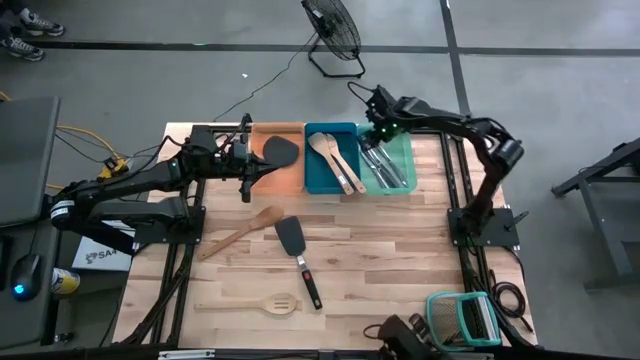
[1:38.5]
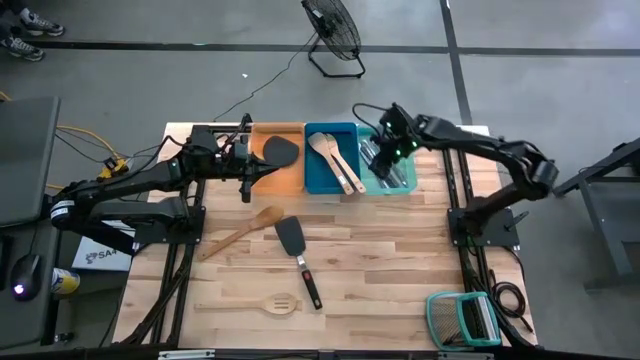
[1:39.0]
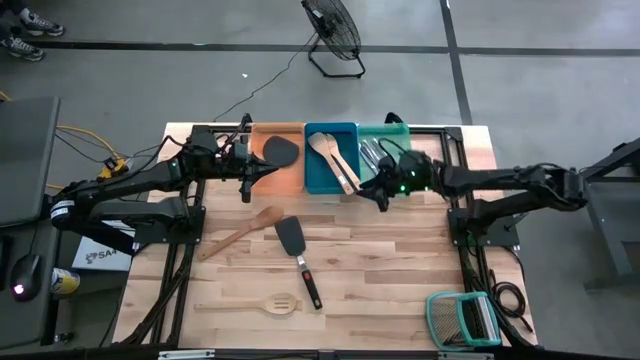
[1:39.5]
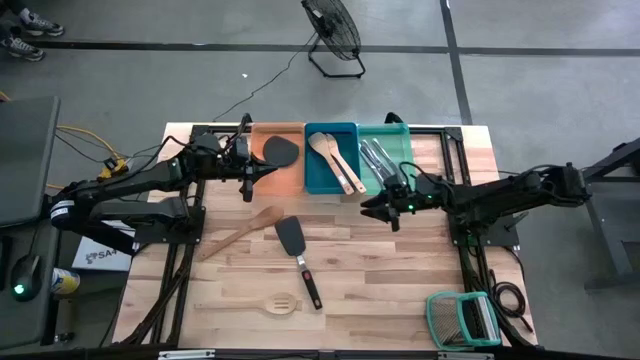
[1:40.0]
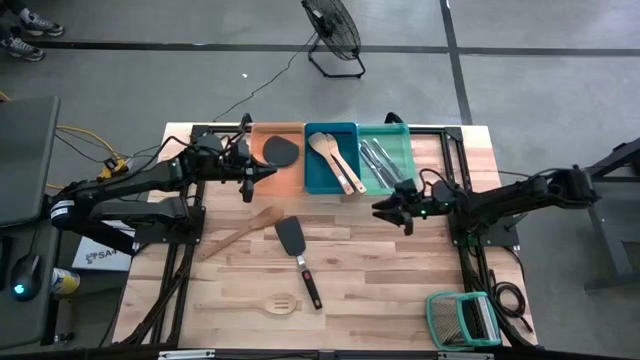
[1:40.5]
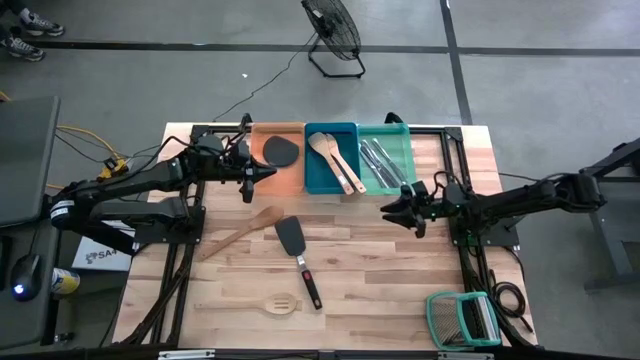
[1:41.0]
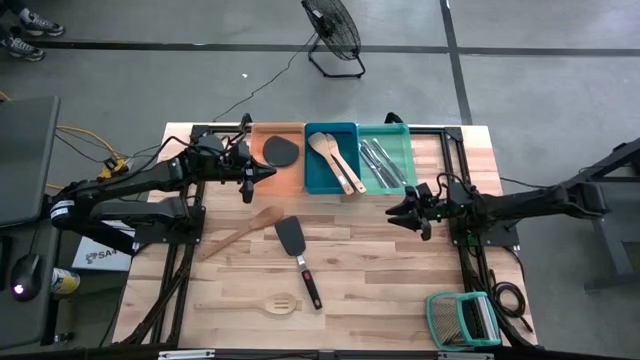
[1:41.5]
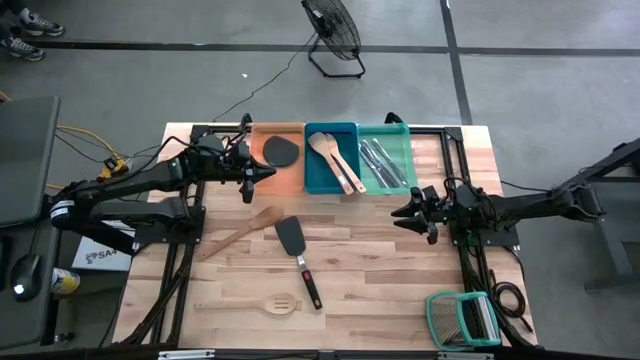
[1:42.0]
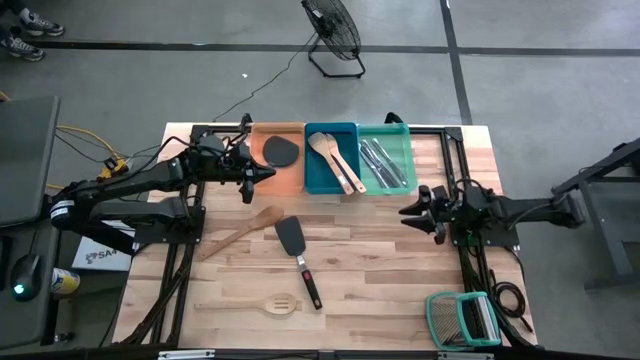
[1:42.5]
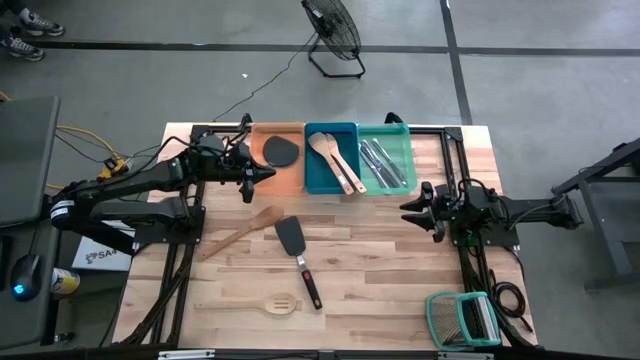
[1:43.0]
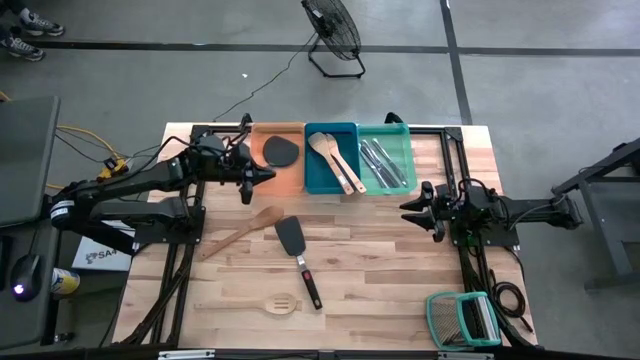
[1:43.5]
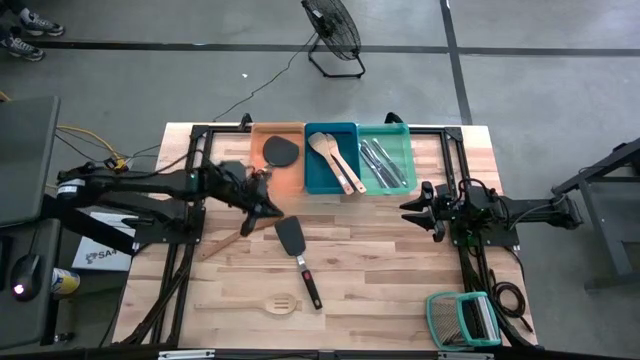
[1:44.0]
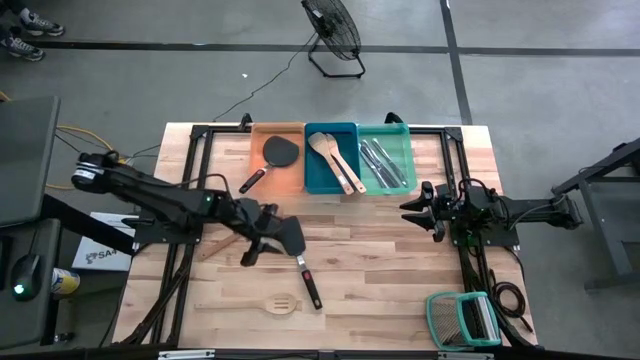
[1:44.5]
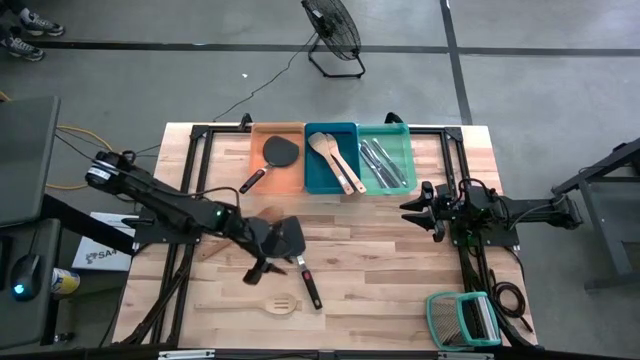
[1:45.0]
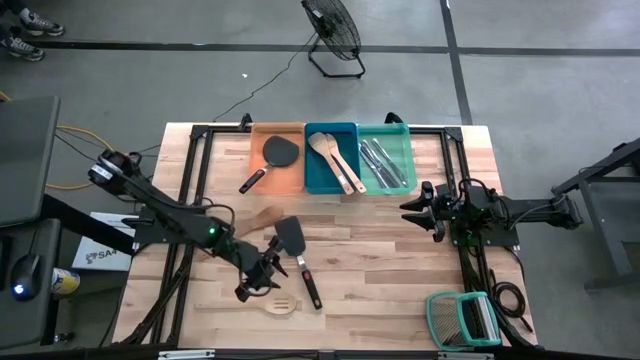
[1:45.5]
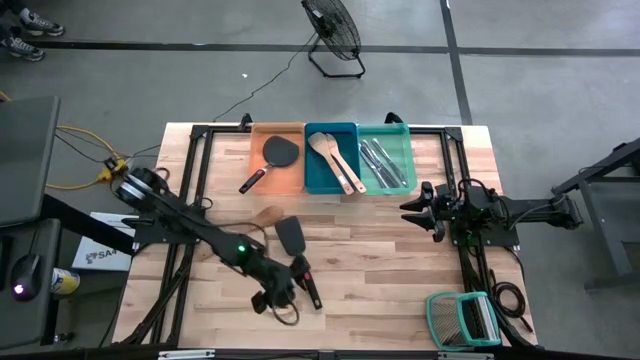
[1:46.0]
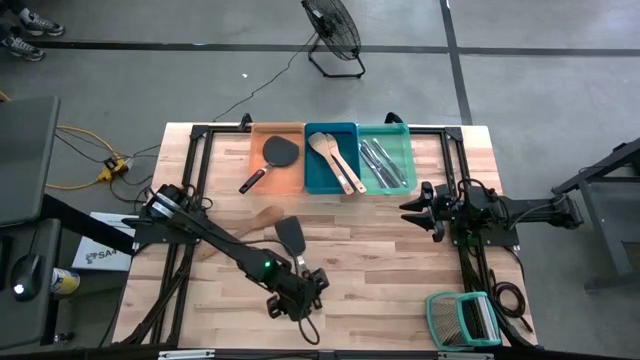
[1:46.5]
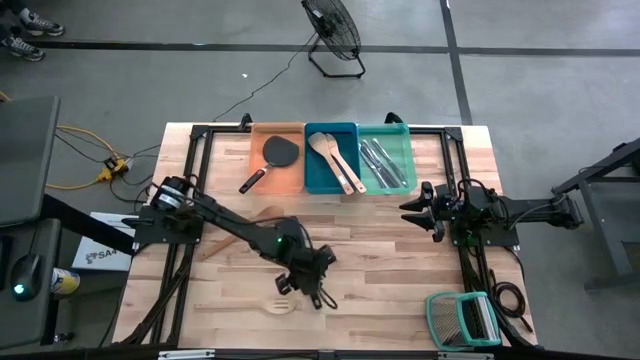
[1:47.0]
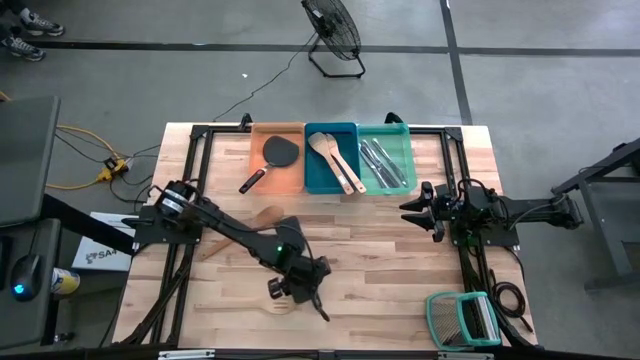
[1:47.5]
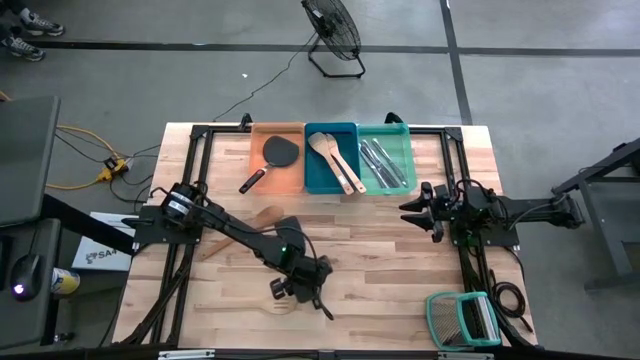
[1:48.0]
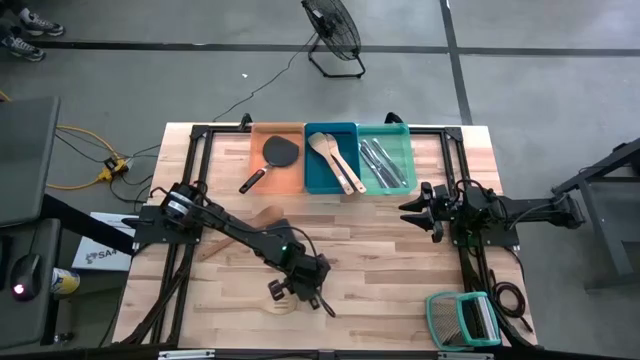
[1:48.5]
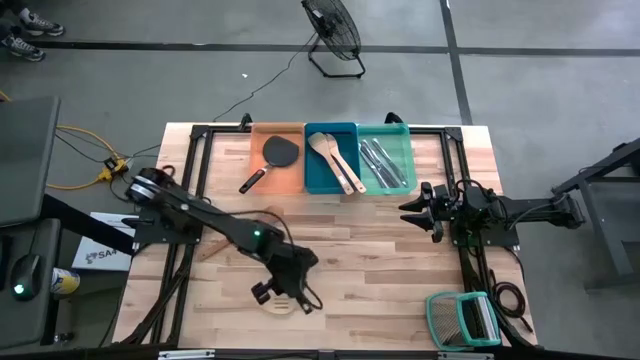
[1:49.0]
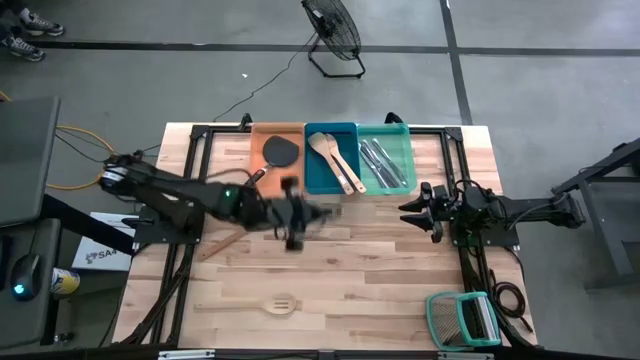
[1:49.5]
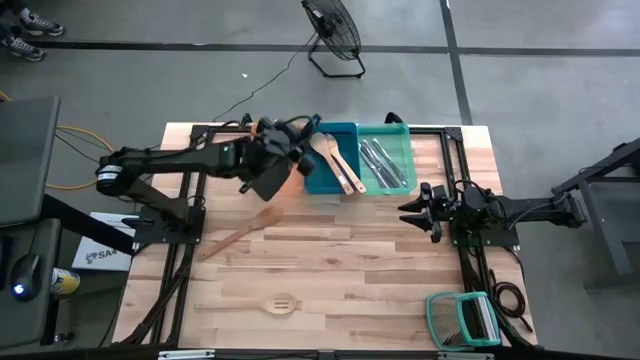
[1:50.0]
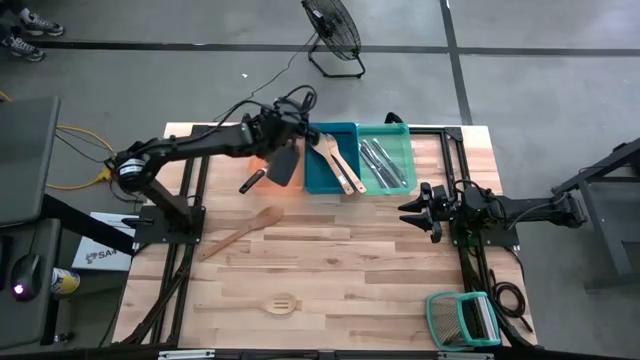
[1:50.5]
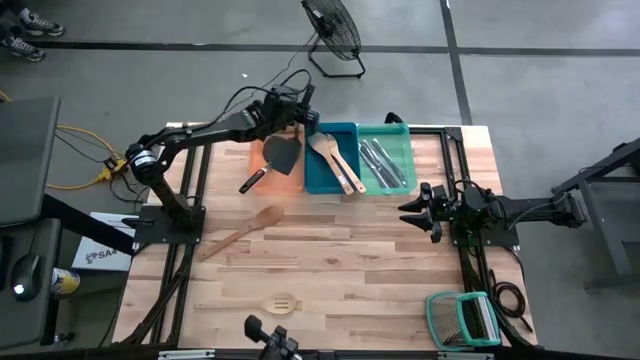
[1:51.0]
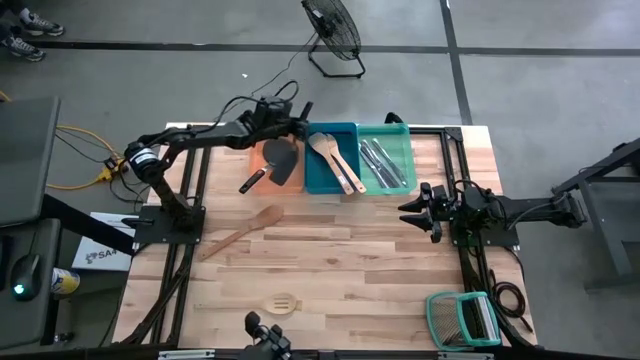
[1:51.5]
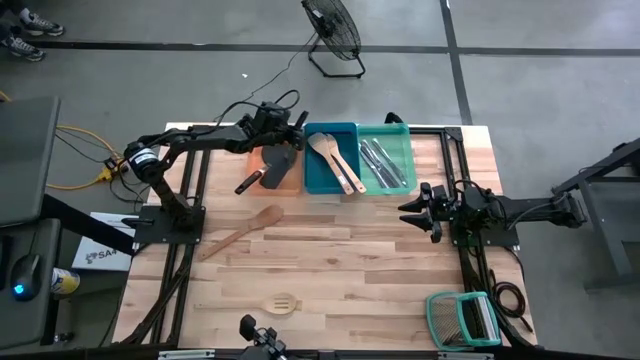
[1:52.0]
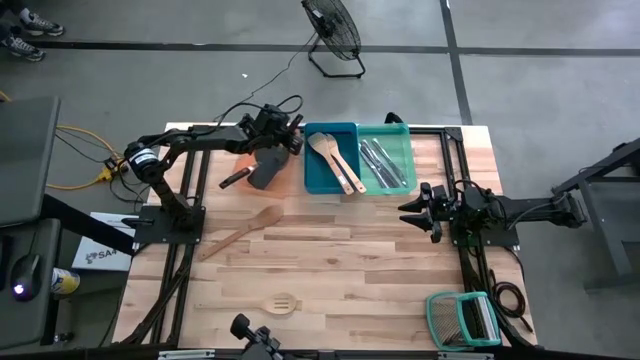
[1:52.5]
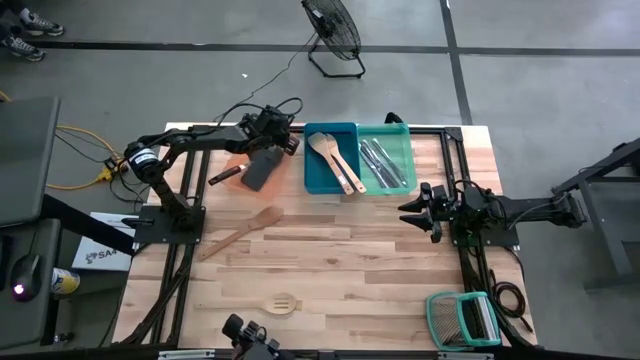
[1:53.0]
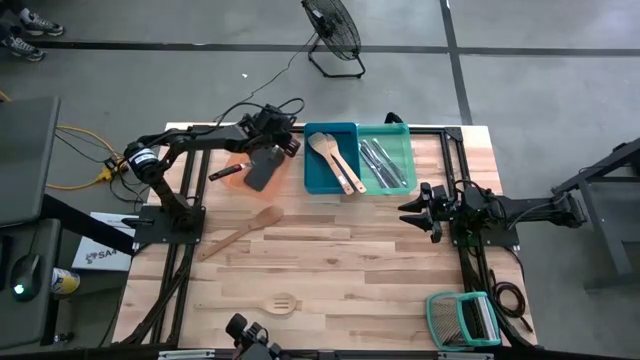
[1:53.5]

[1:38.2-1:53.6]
Task: Pick & Place Kitchen Items
Put the black silicone spatula into the blue bin

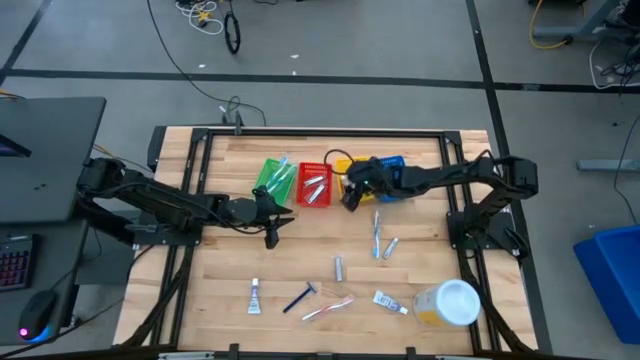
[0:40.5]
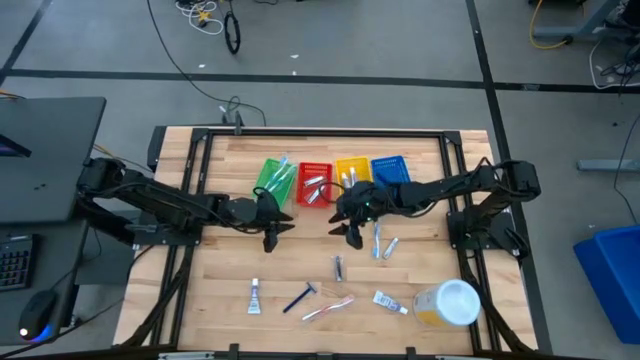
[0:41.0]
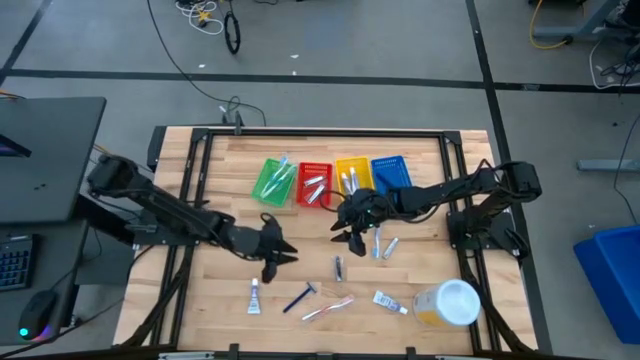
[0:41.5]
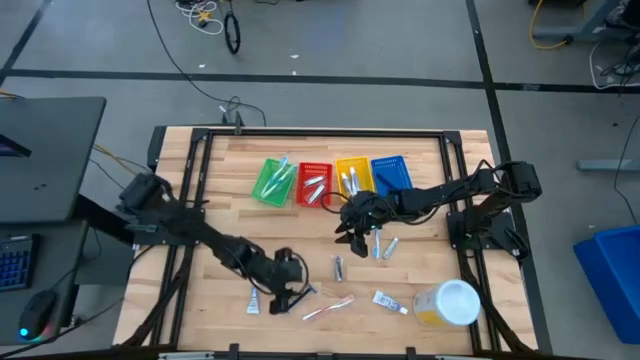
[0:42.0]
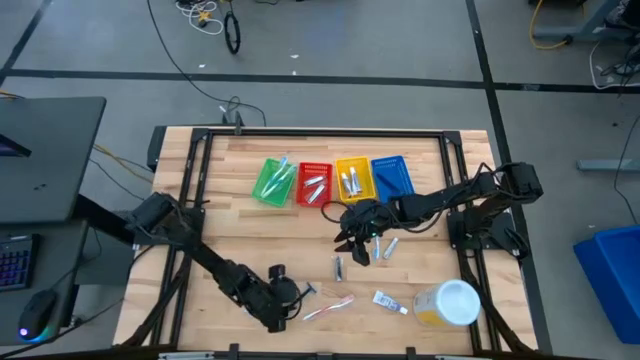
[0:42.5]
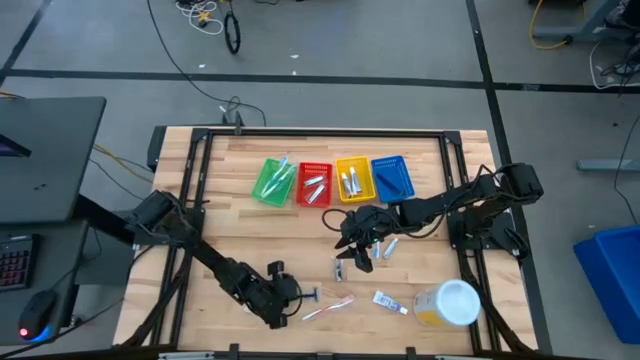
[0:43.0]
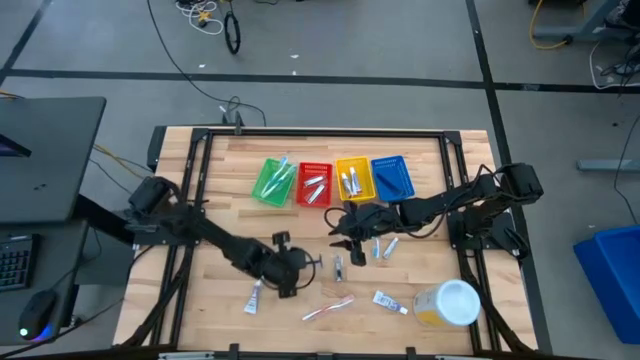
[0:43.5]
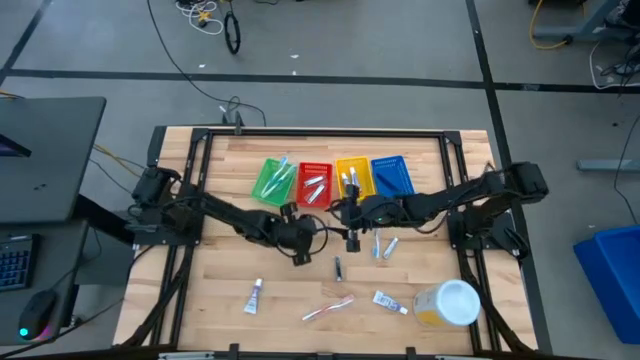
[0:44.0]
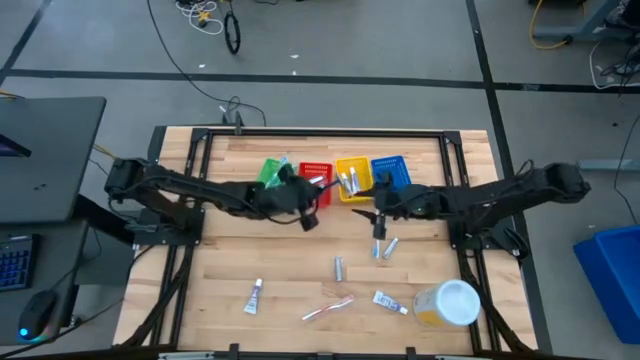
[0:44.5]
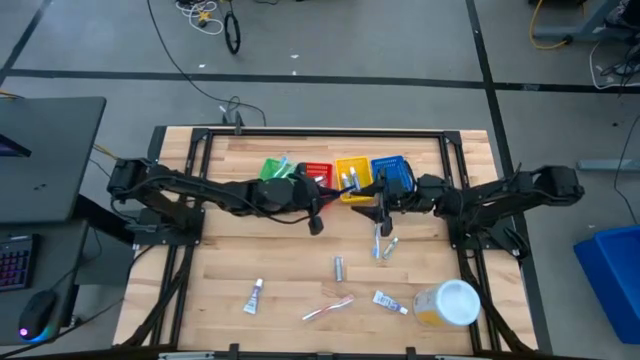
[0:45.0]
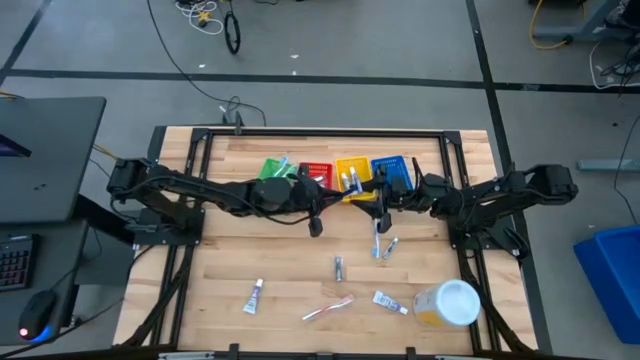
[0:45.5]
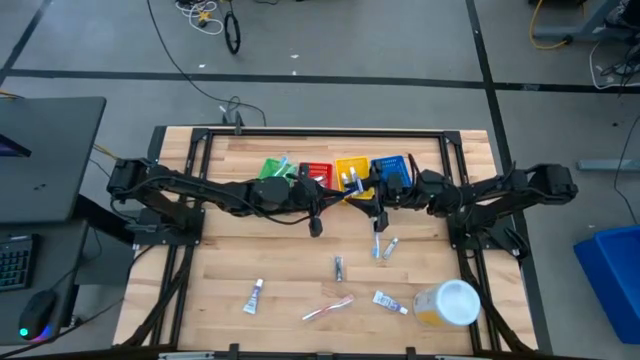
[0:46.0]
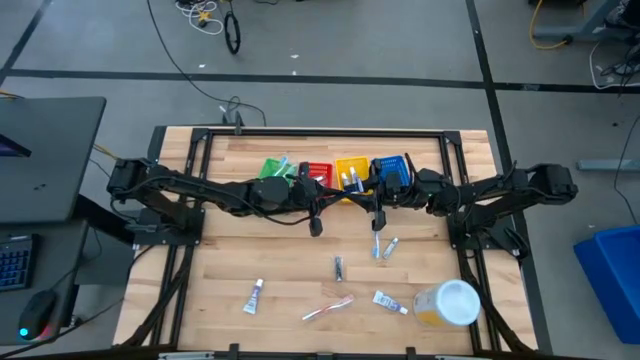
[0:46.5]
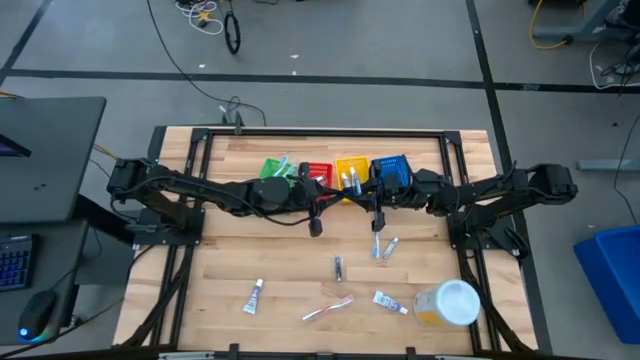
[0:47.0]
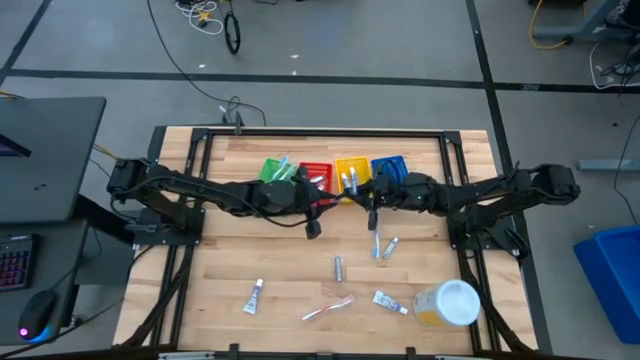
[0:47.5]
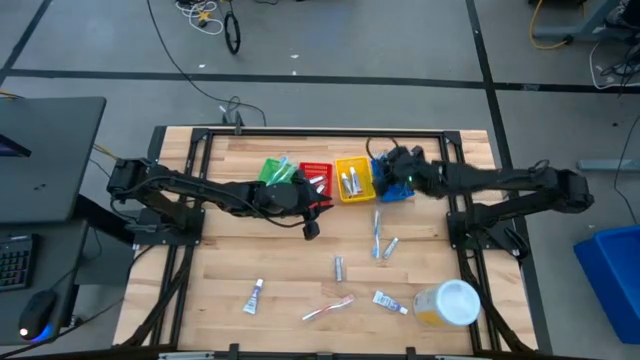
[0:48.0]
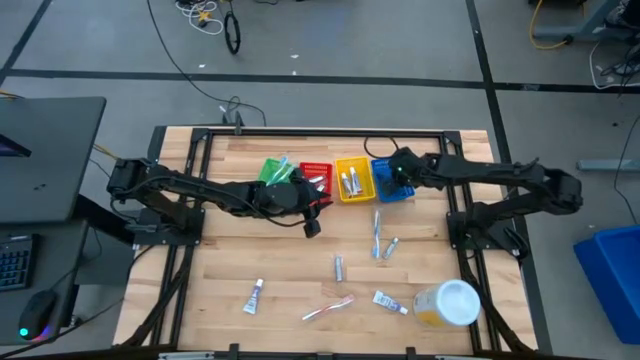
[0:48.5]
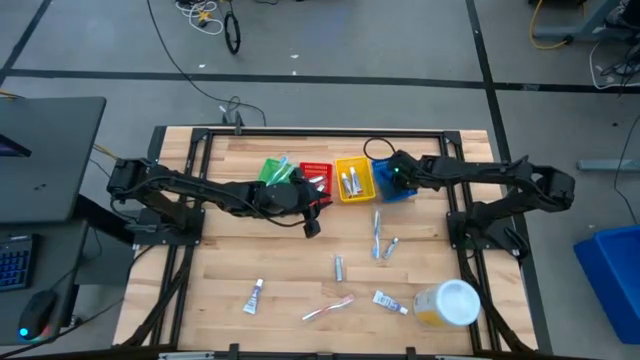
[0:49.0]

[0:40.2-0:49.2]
Task: Pick & Place Travel size toiletries
Put the blue razor into the blue bin
